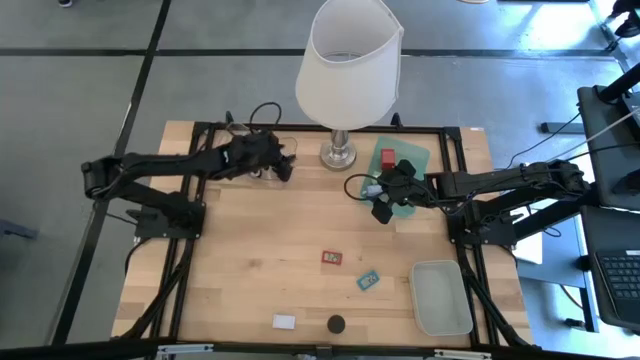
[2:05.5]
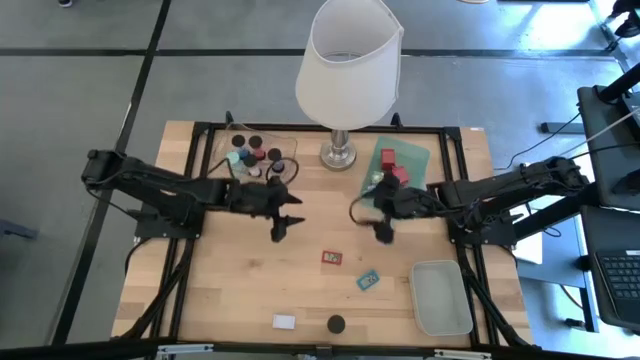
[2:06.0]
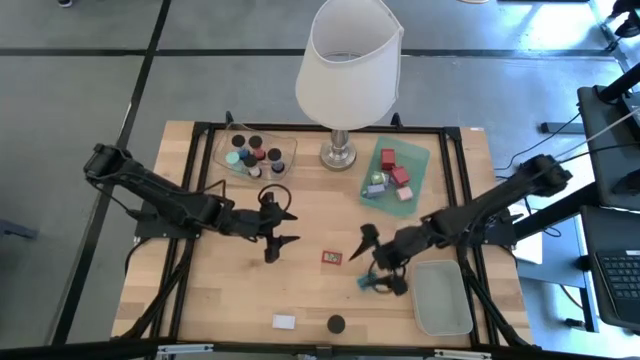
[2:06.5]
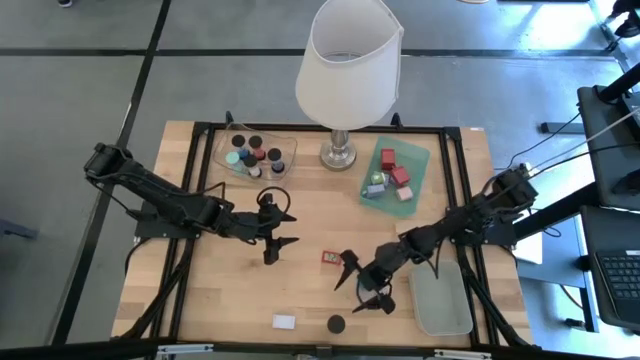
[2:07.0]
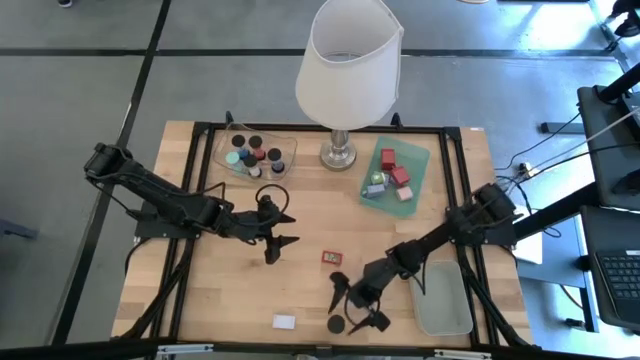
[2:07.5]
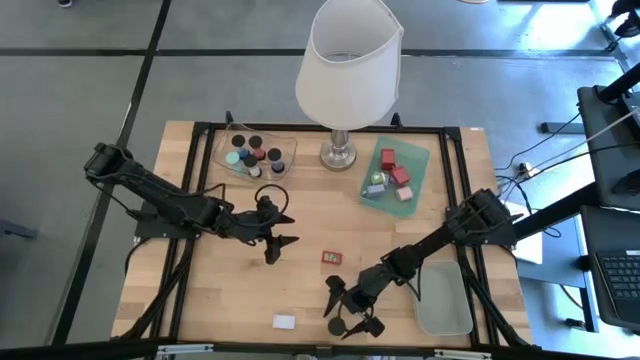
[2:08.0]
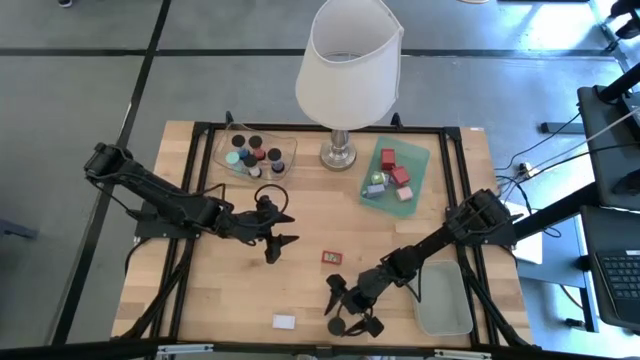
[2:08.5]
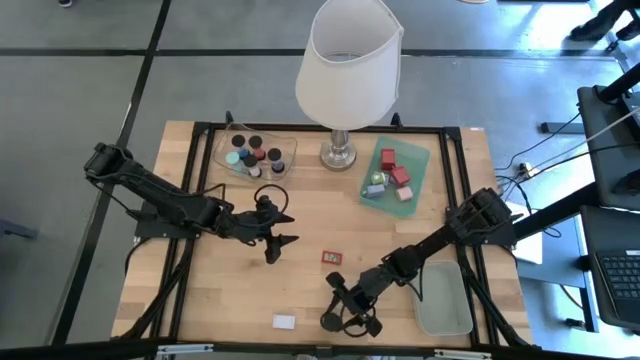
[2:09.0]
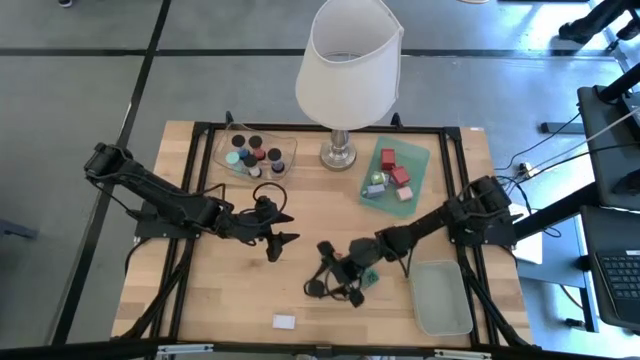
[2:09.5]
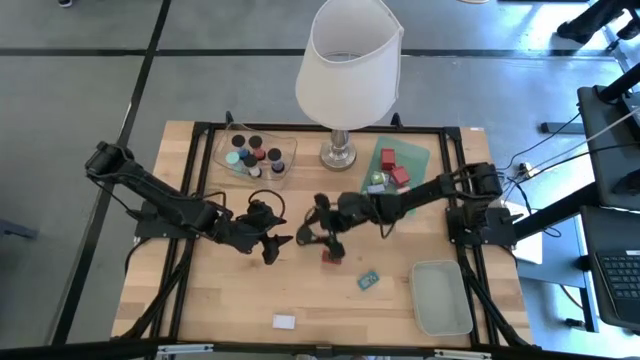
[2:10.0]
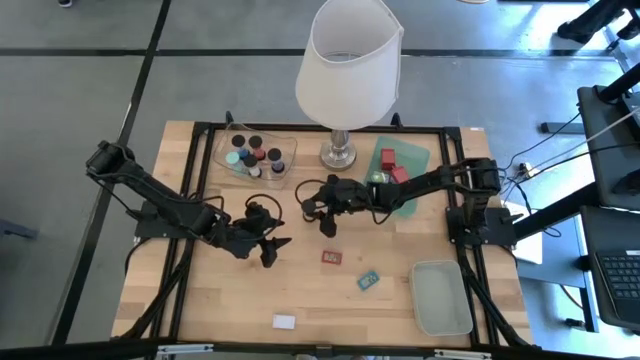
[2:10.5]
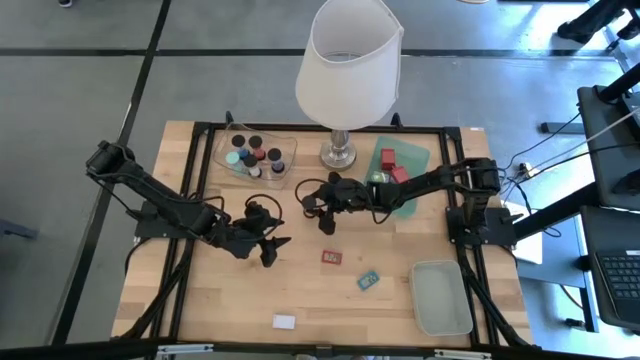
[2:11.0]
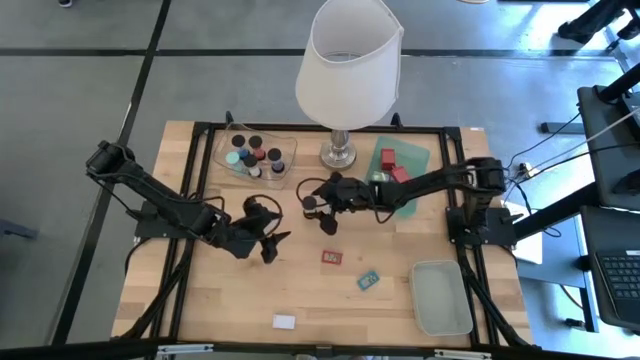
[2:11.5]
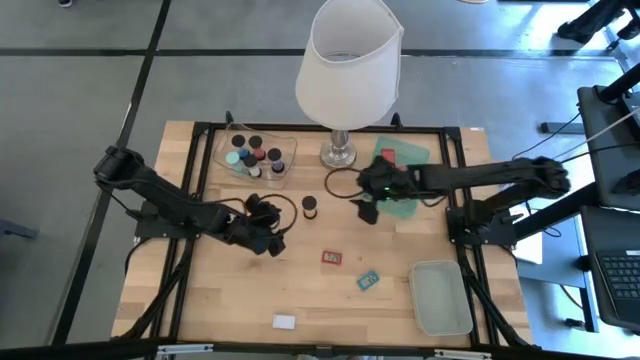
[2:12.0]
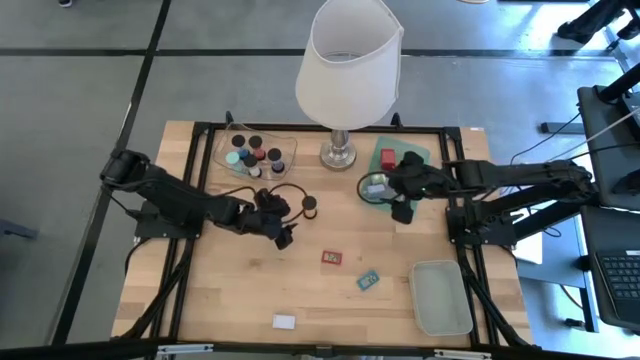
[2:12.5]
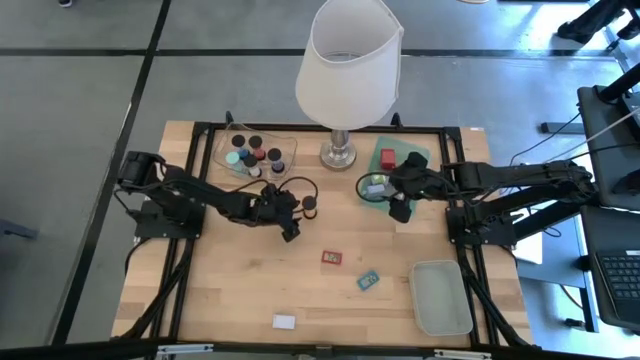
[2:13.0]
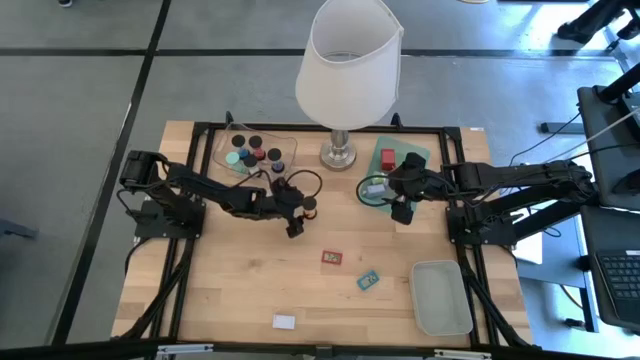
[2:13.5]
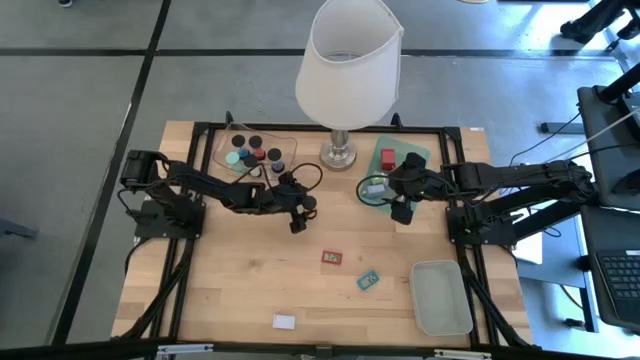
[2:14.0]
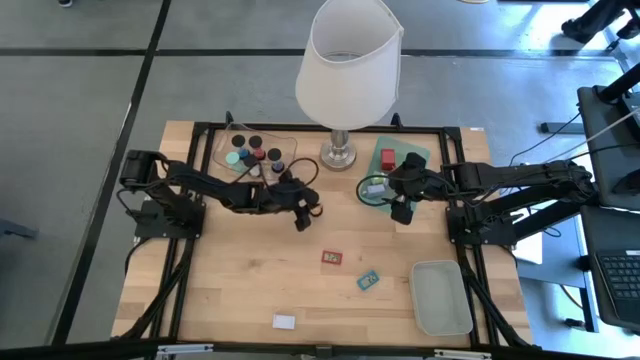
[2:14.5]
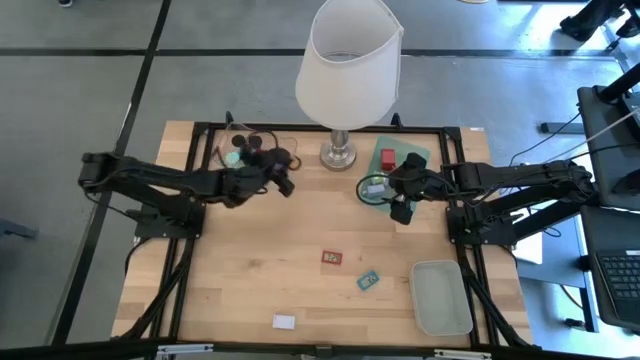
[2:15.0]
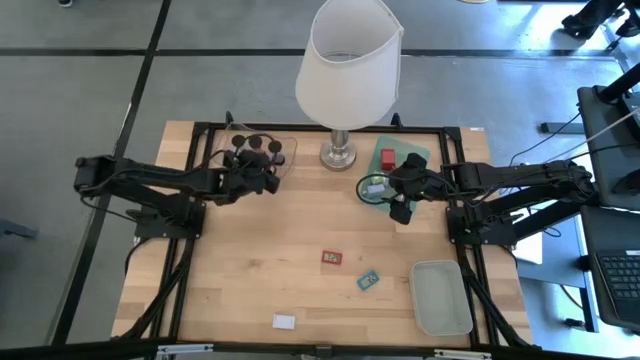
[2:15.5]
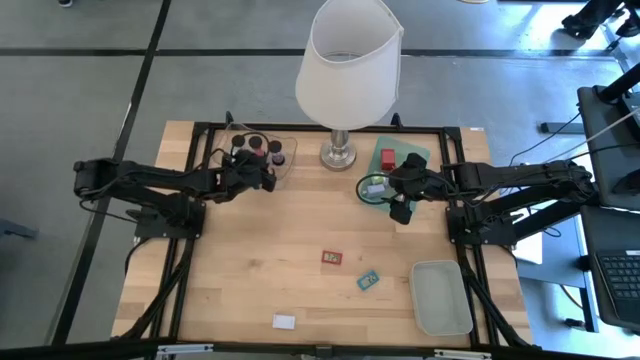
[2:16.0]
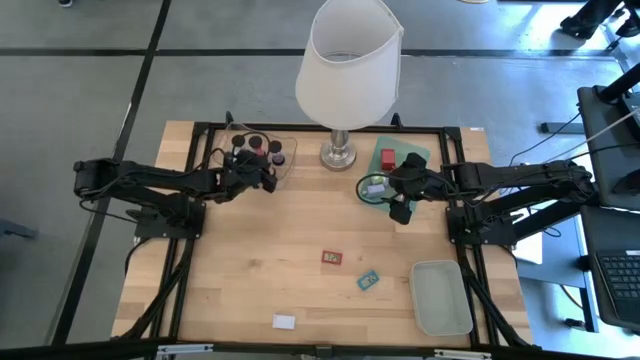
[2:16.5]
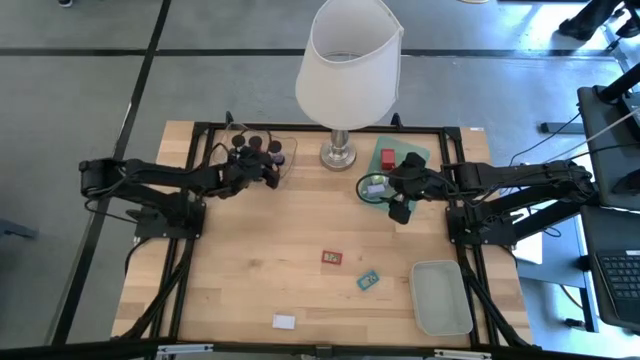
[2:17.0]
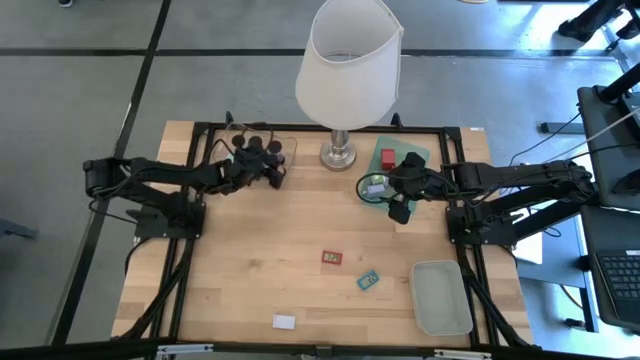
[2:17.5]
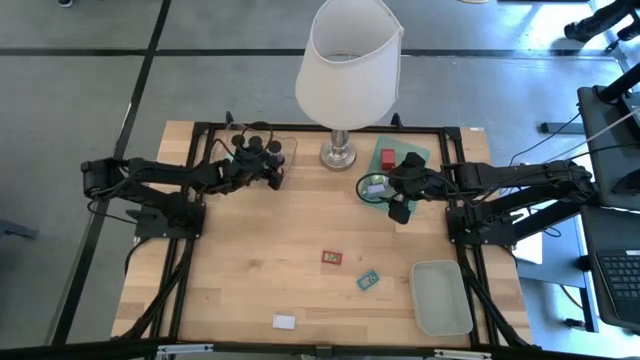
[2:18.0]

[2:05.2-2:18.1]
Task: Pick & Place Office items
Put the orange hourglass into the transparent bin

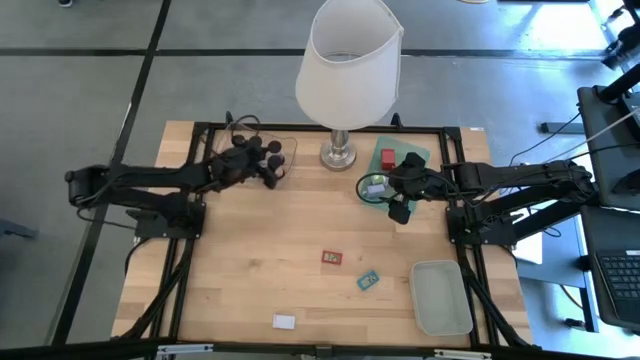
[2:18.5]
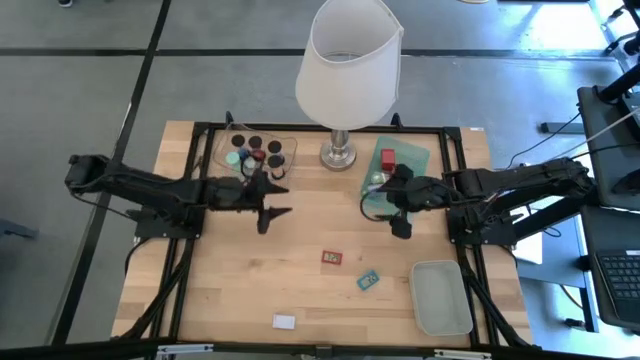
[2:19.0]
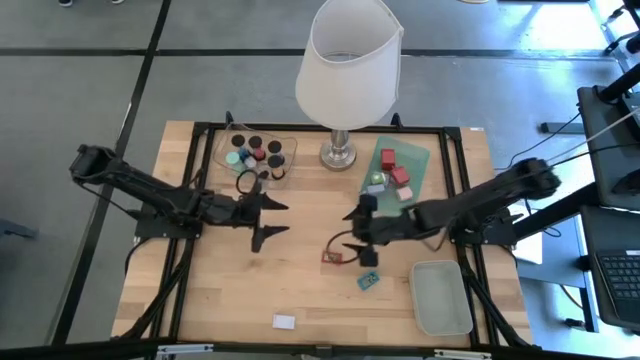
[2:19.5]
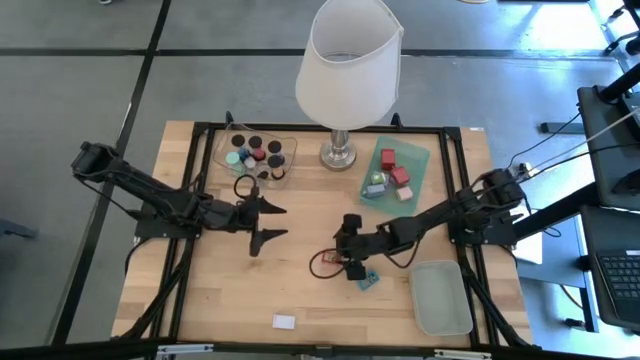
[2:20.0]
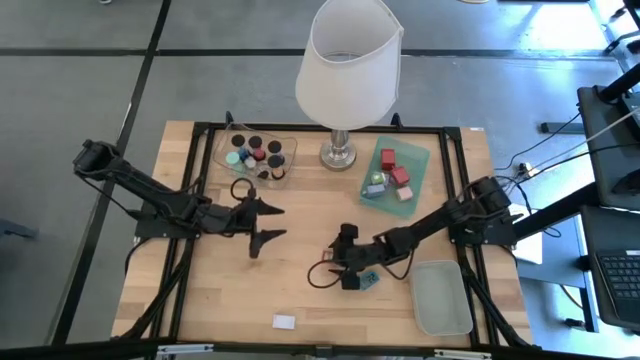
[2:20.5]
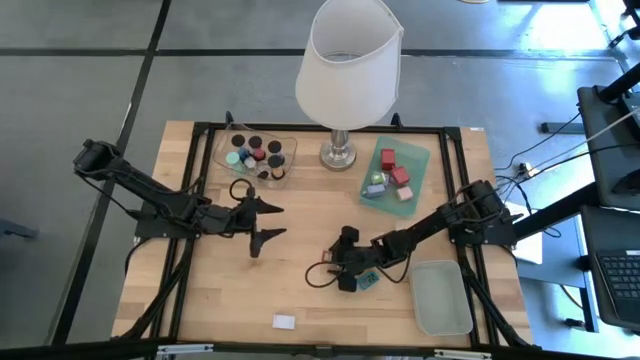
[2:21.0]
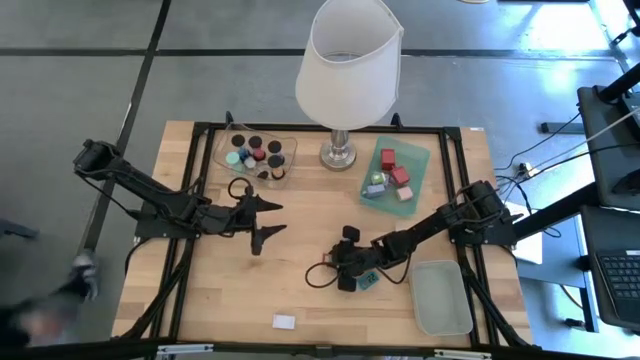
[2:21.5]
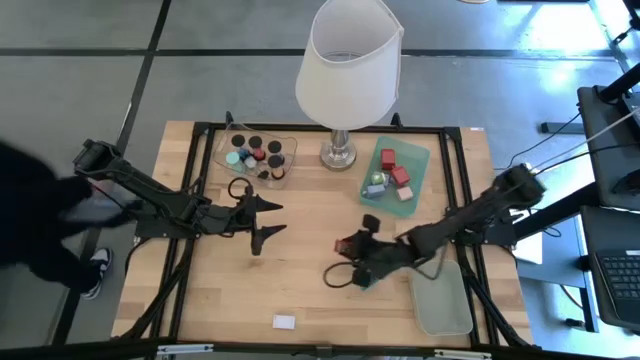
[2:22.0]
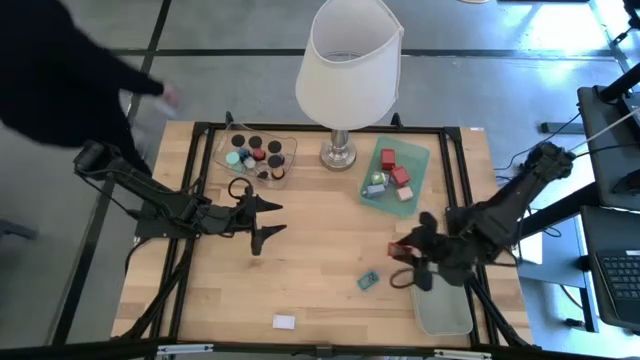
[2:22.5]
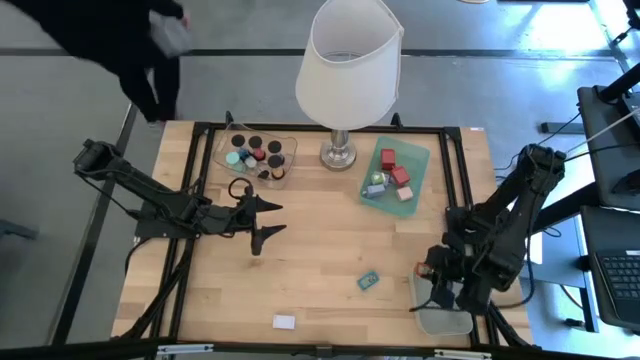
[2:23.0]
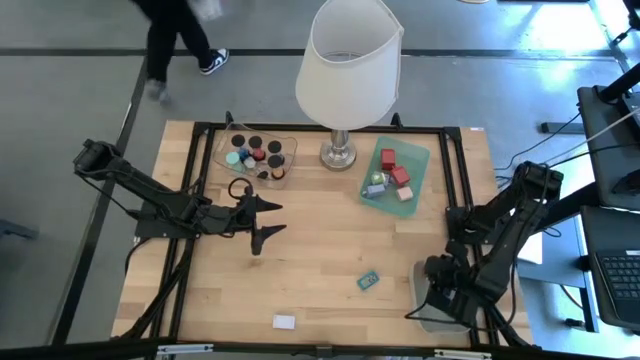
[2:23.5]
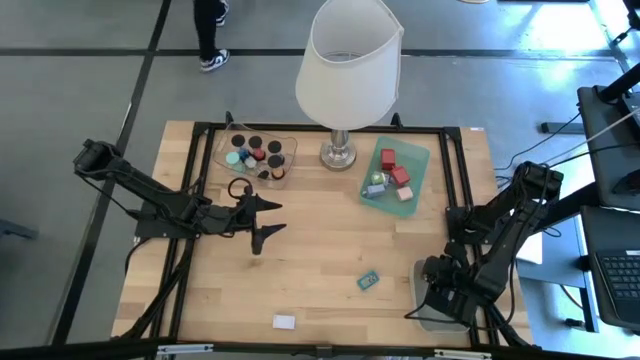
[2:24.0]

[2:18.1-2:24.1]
Put the red digital timer into the gray bin

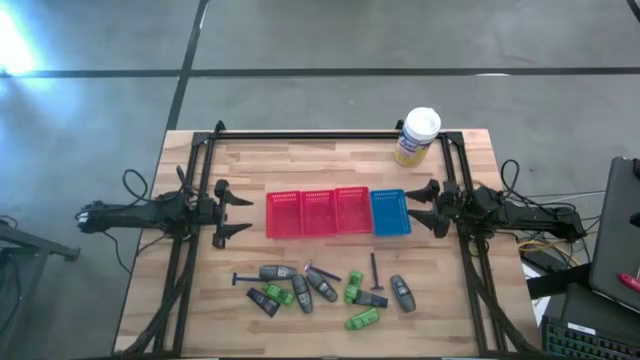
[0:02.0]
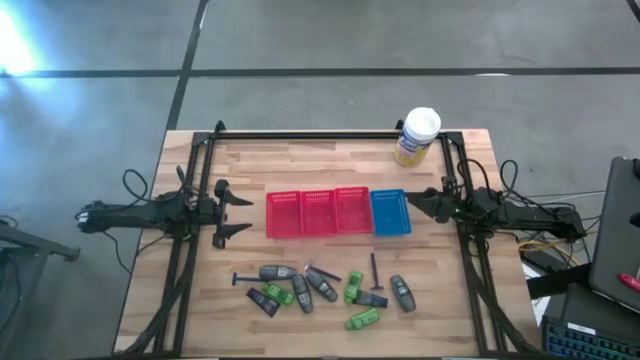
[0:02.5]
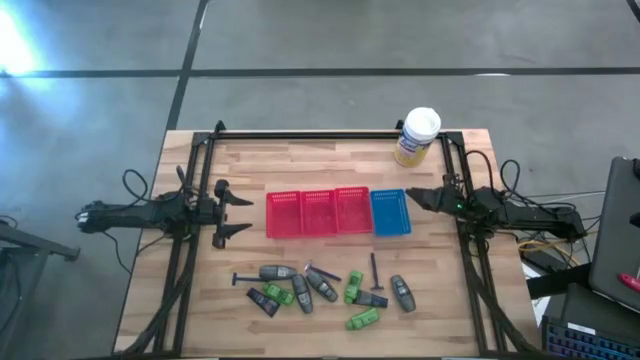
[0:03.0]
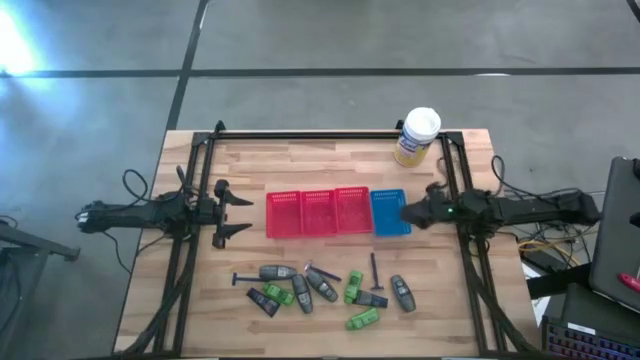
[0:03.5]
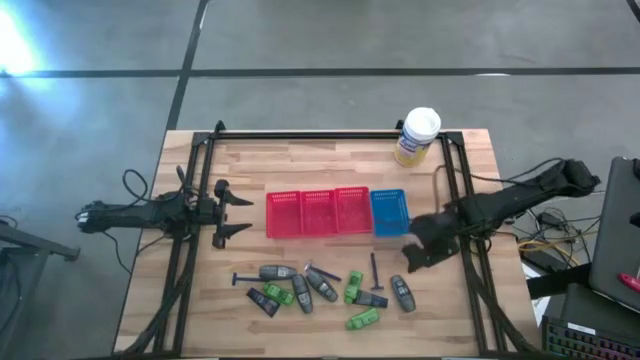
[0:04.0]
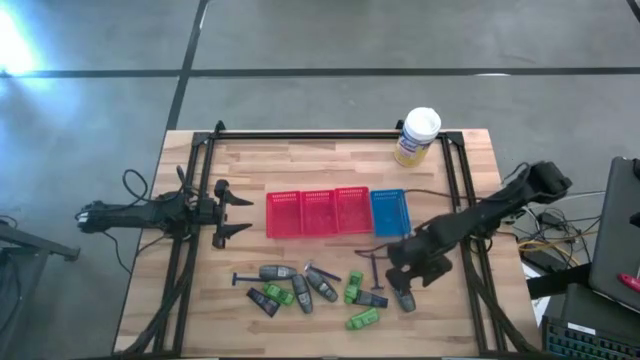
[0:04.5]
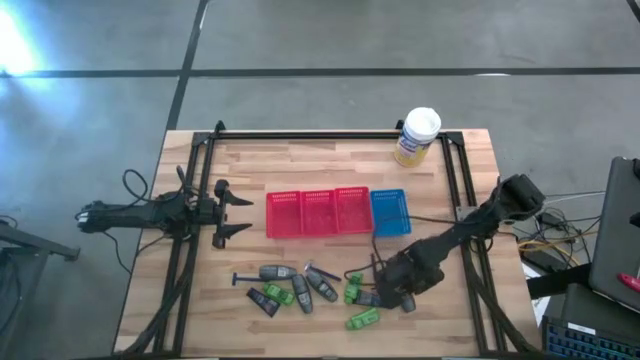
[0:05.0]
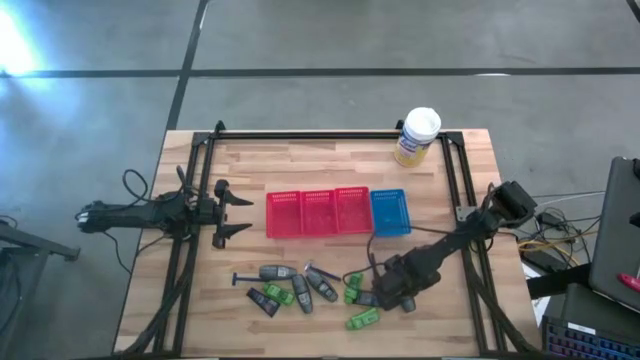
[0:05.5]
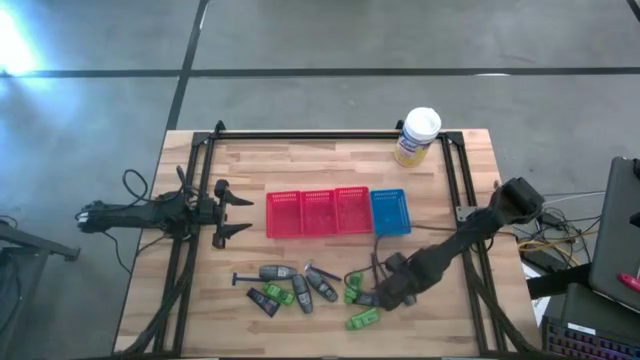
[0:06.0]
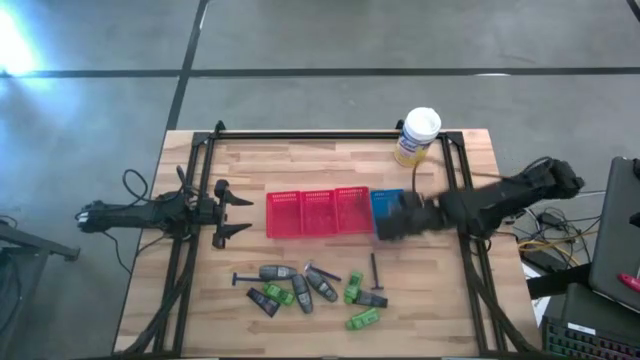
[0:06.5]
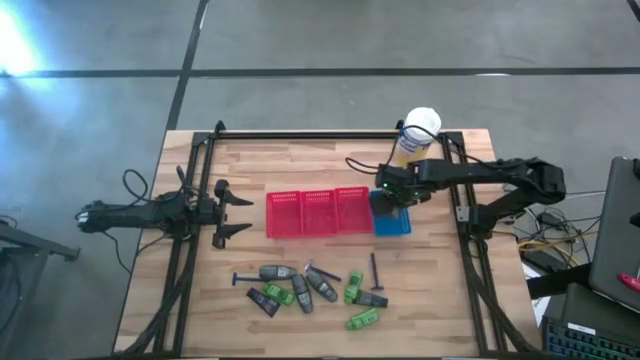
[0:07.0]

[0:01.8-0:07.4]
Task: Pick & Place Travel size toiletries
Put the gray deodorant into the blue bin
